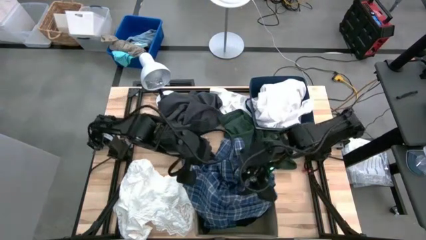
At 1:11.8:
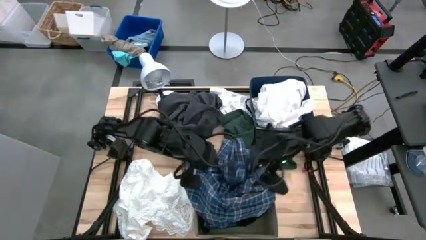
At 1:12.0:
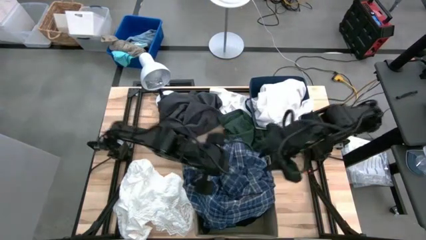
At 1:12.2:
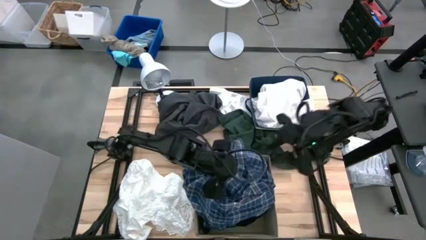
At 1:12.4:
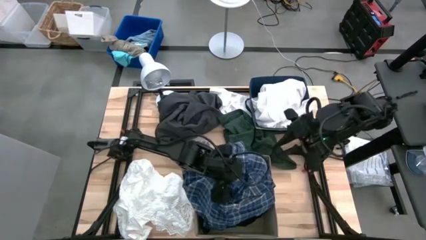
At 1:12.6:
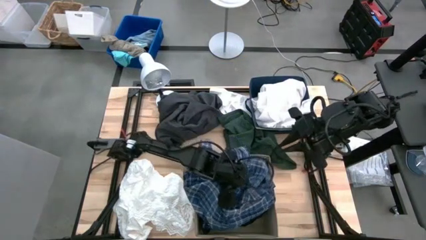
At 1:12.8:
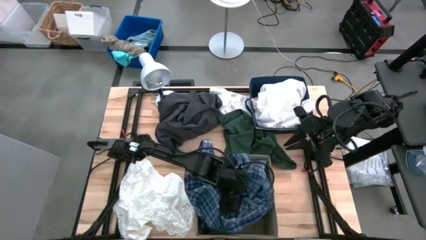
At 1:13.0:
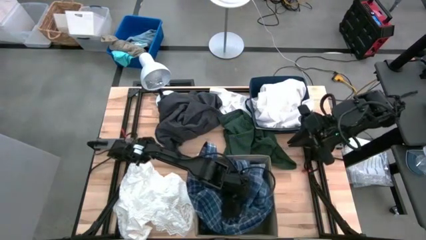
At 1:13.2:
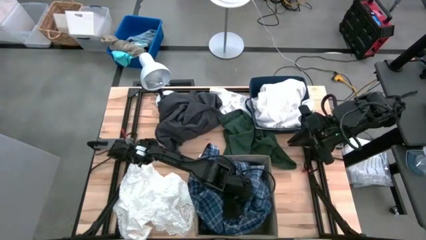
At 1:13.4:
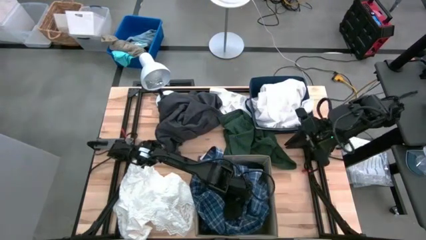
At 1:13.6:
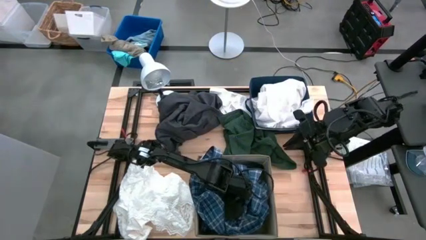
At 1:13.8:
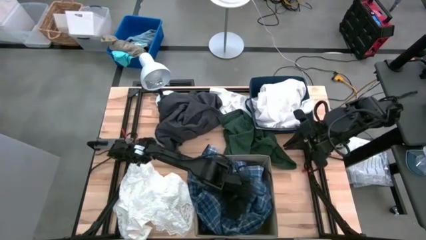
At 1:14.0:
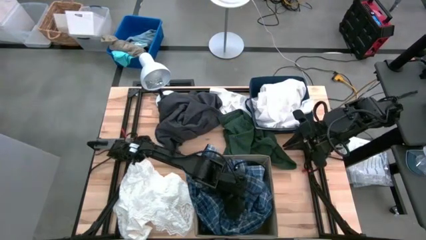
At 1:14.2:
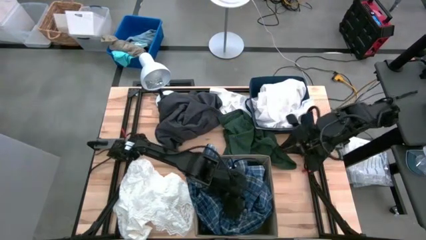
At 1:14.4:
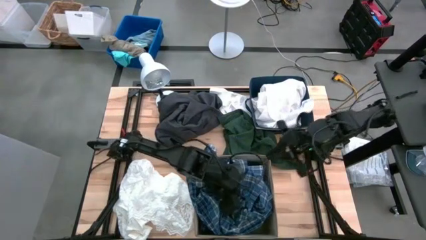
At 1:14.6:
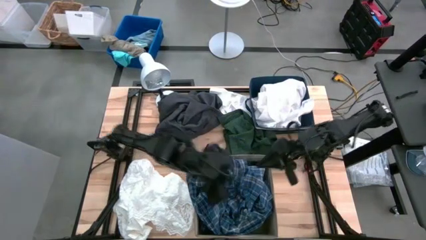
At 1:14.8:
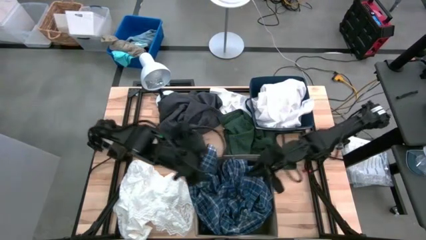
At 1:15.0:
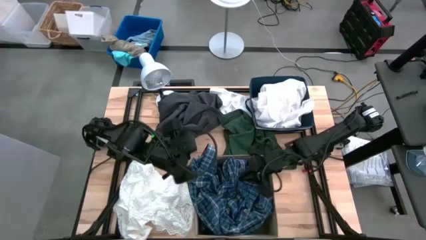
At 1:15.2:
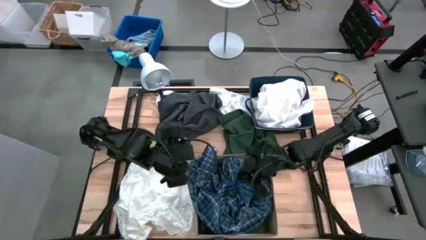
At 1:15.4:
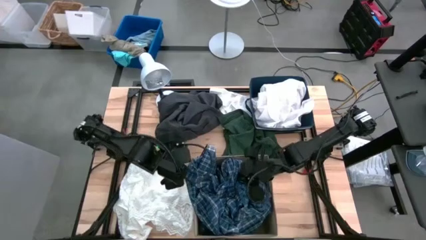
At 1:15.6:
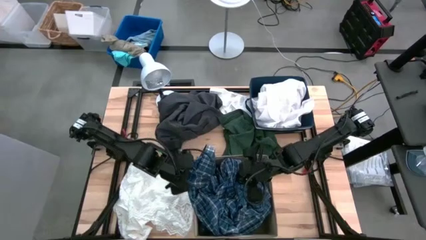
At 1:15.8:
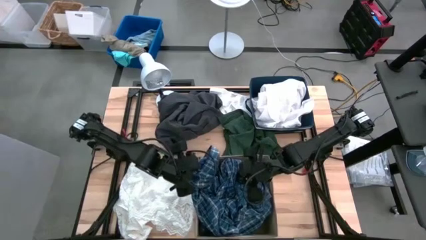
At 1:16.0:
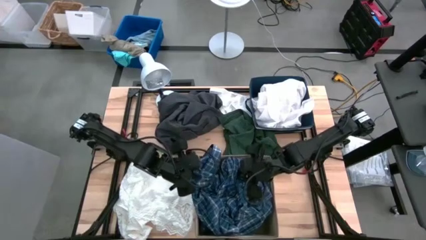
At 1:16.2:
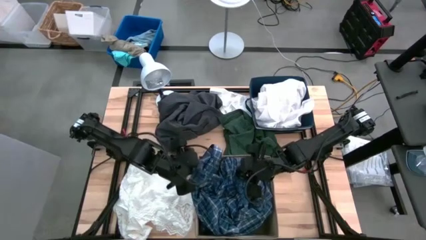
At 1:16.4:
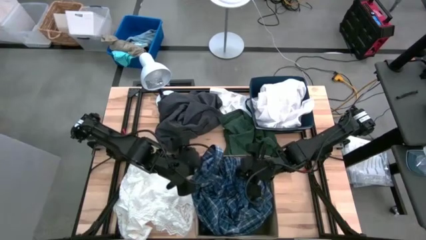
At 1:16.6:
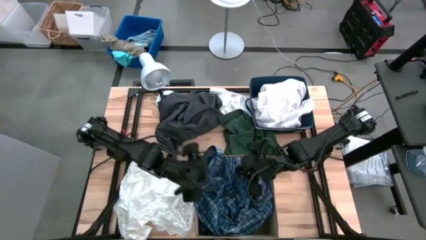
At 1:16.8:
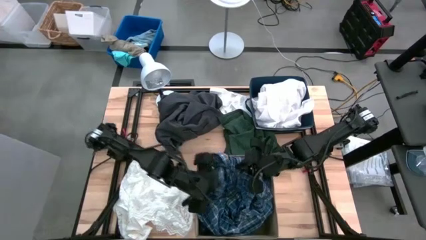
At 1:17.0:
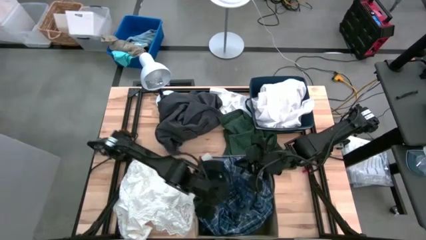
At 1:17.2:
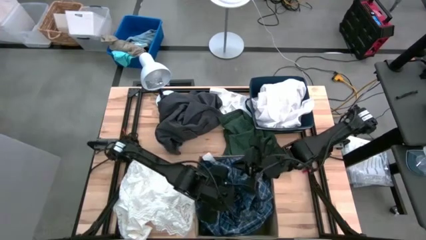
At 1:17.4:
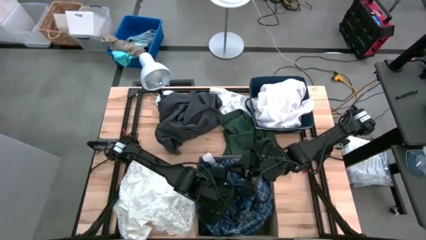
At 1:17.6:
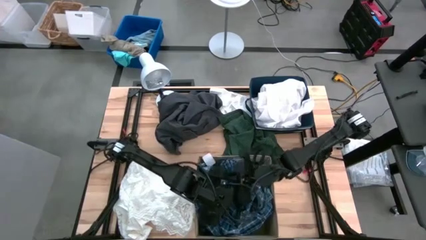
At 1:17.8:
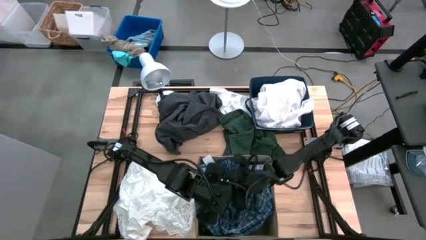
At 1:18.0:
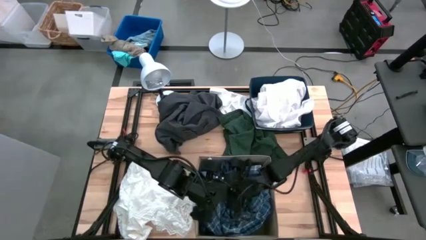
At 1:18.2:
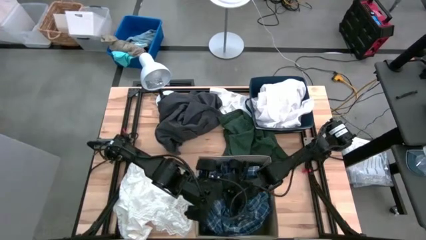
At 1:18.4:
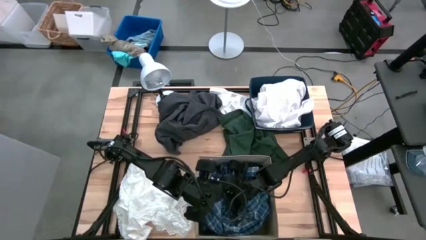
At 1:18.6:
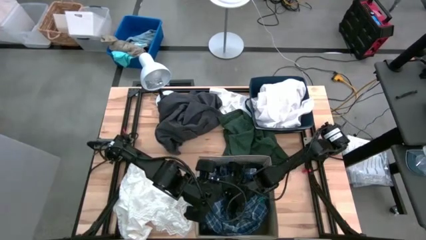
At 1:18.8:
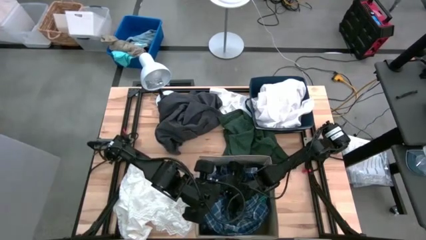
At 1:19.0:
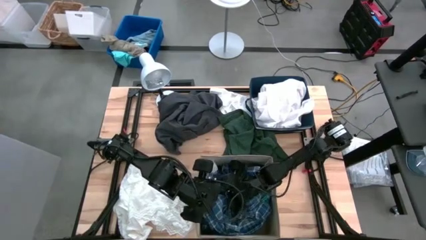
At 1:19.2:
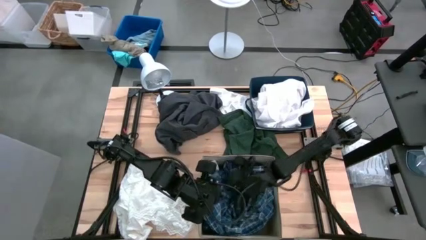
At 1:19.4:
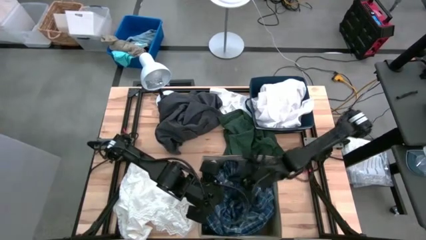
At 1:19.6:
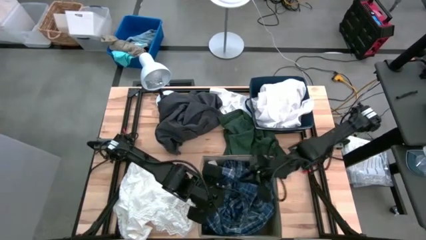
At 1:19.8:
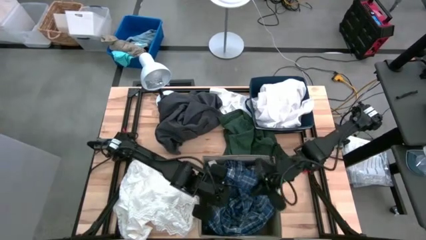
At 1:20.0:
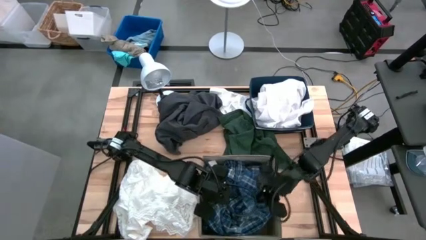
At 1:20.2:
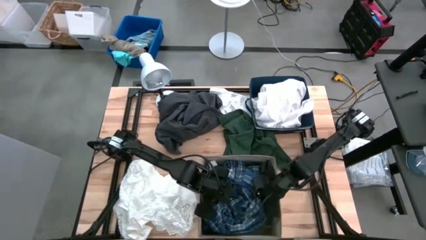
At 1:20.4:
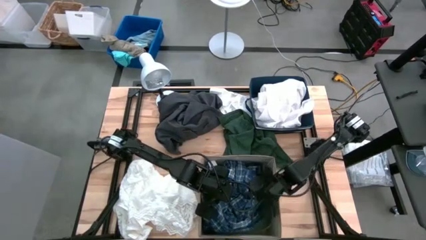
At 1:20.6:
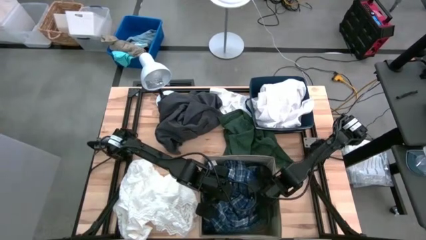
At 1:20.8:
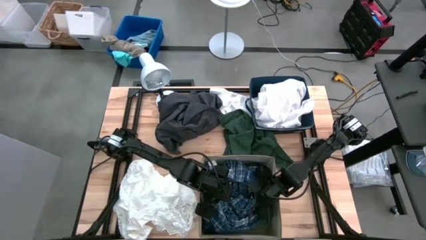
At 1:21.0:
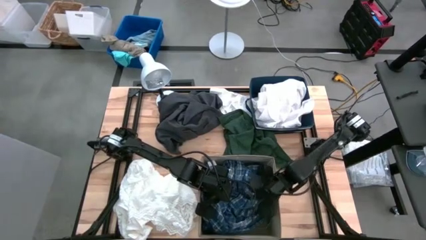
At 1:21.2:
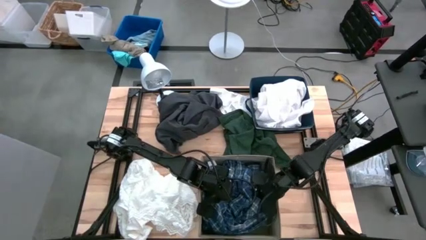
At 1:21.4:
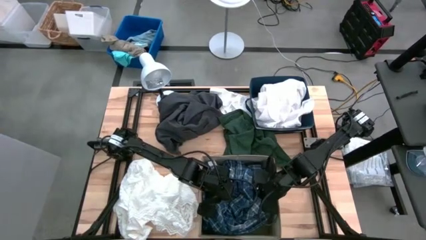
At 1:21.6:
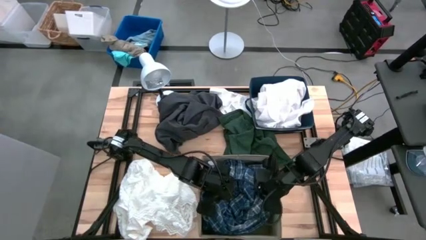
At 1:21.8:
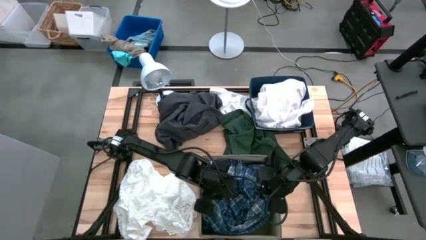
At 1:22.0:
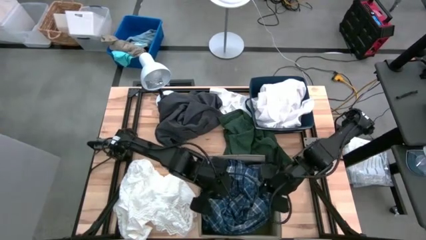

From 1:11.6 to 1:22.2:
Task: Sort clothes
Put the blue checkered polo shirt into the brown laundry organizer

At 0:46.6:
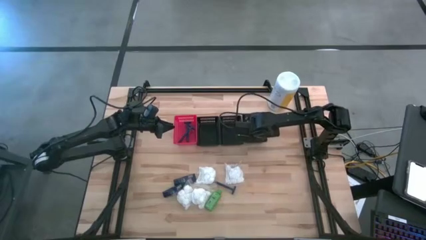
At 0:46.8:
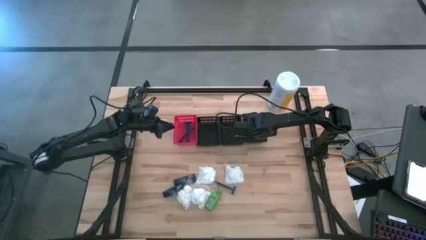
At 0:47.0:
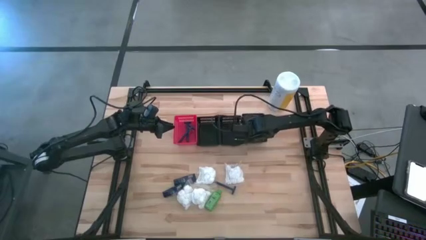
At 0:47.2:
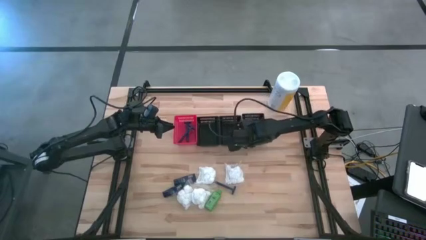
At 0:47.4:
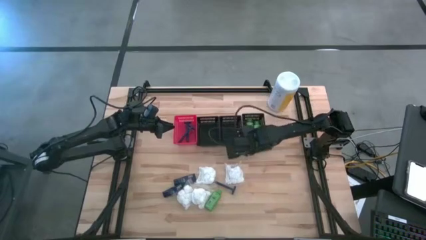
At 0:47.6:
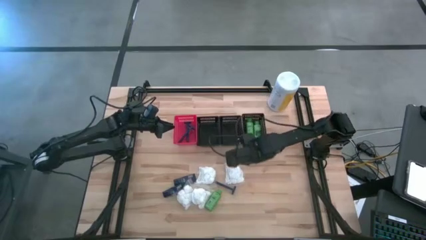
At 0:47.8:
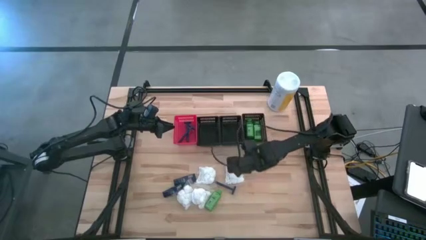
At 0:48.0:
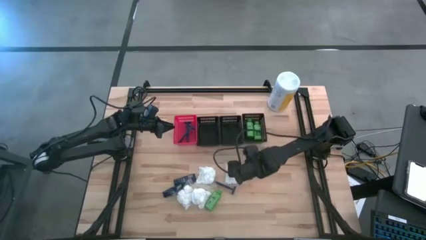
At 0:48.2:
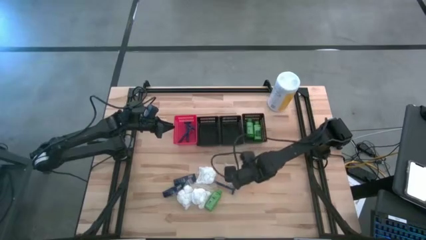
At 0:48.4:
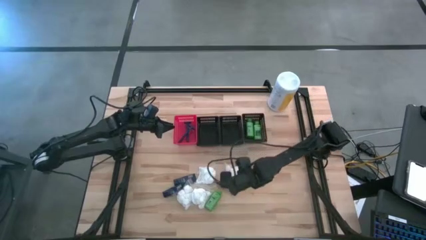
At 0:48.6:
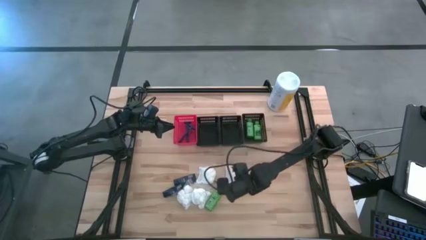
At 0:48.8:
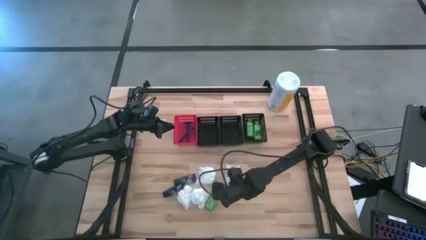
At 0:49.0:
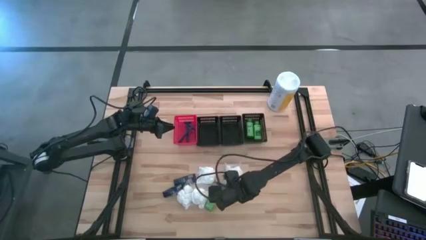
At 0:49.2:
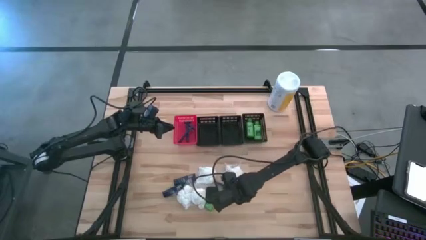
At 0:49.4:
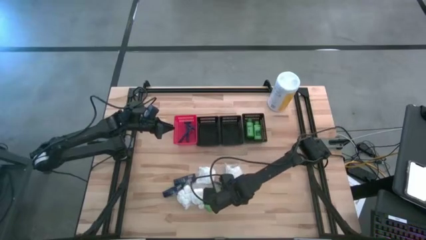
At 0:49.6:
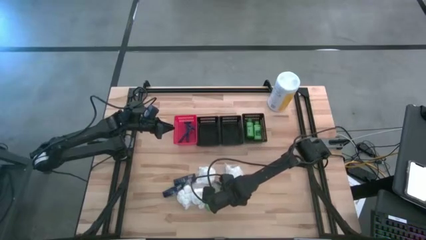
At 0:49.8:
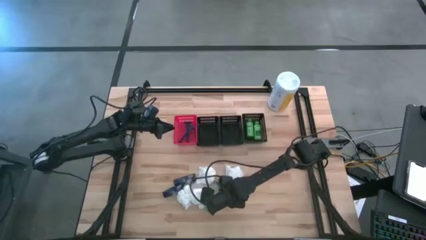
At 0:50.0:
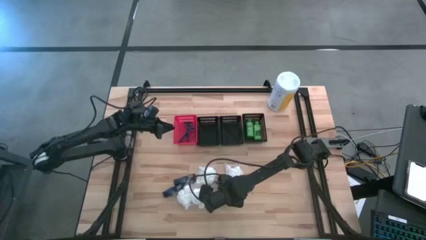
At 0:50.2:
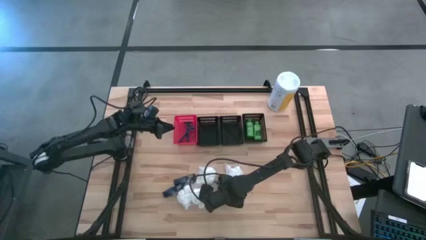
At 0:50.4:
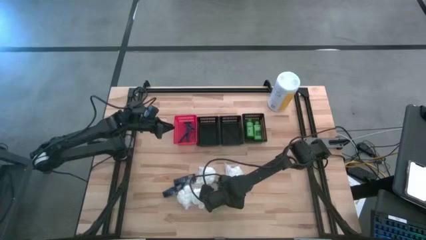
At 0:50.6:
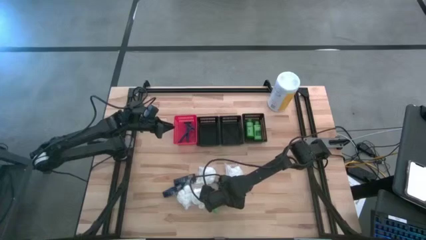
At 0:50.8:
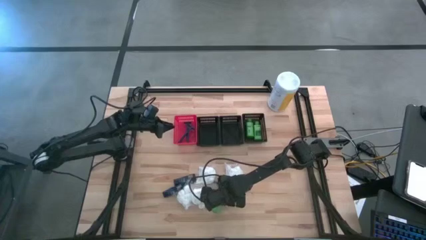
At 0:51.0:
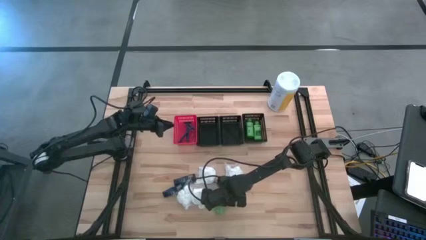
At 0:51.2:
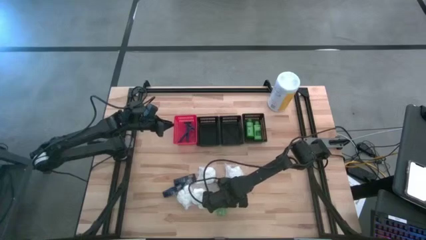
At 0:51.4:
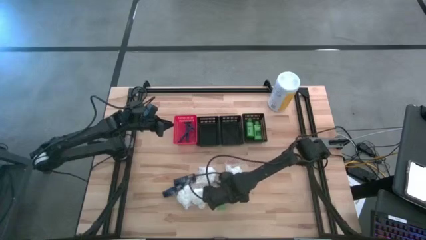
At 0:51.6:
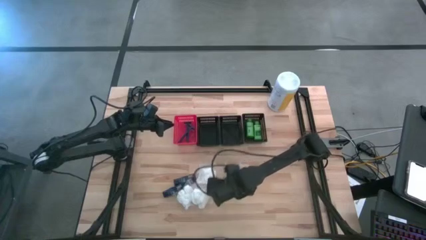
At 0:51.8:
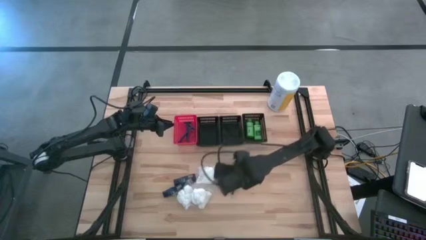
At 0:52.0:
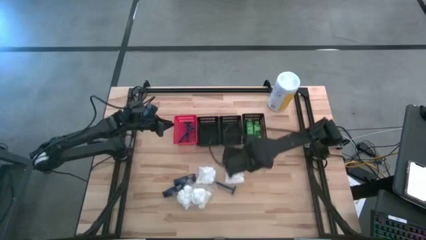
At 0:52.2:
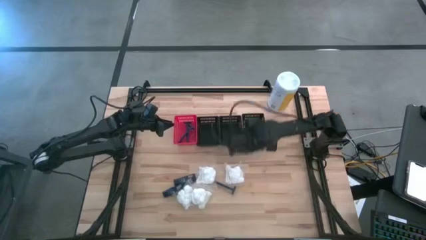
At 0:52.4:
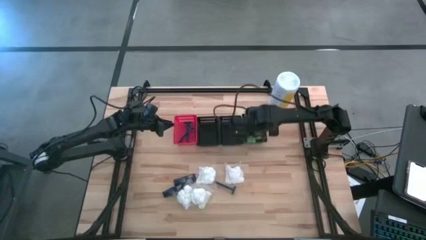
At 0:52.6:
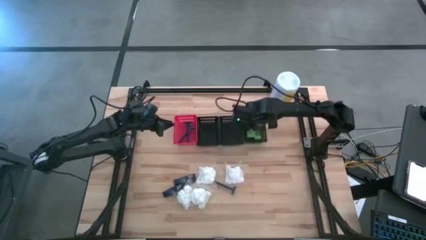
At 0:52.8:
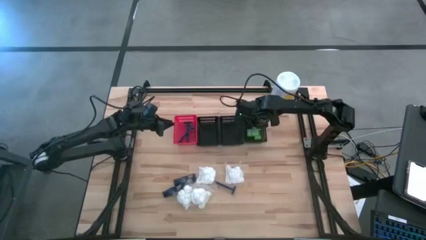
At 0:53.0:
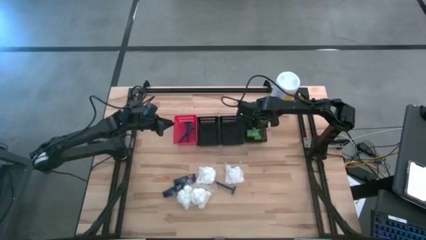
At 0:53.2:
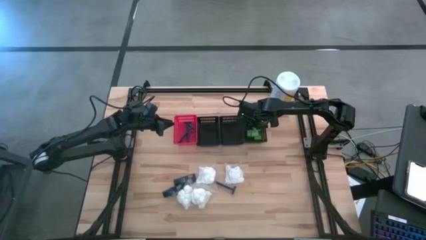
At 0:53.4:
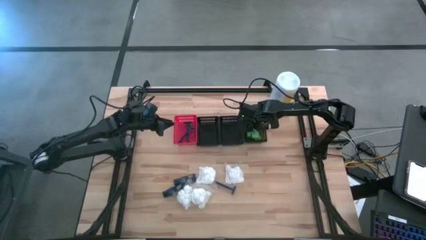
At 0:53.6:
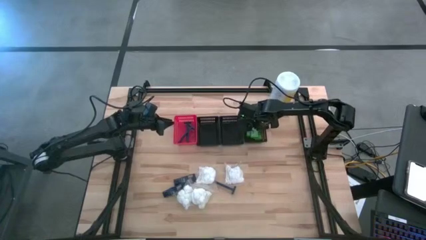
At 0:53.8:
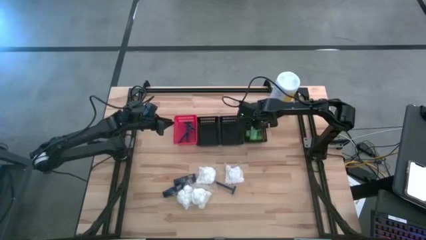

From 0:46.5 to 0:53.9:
Task: Pick & Place Travel size toiletries
Put the shampoo into the right black bin
